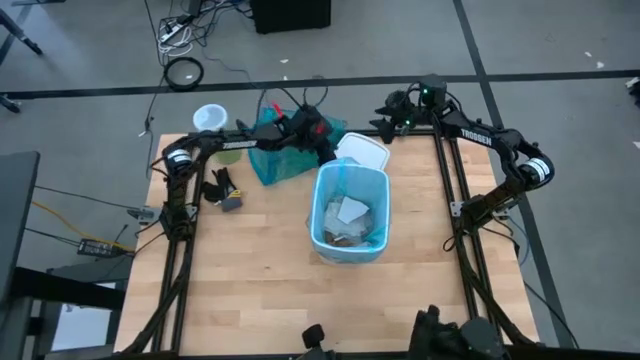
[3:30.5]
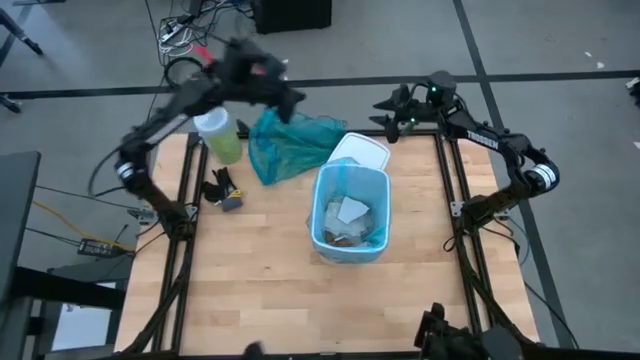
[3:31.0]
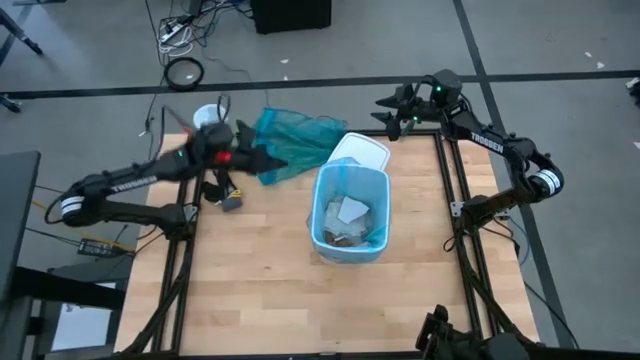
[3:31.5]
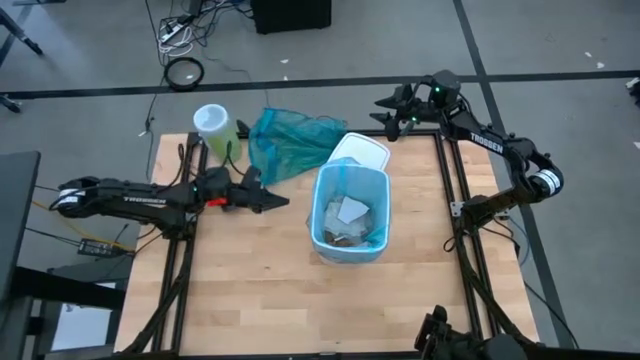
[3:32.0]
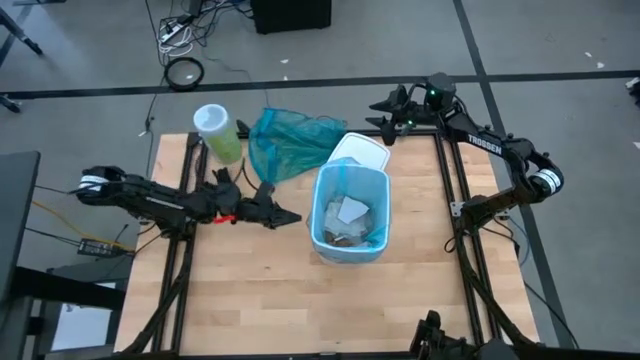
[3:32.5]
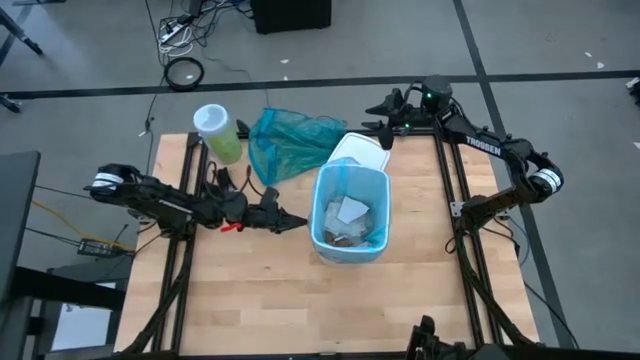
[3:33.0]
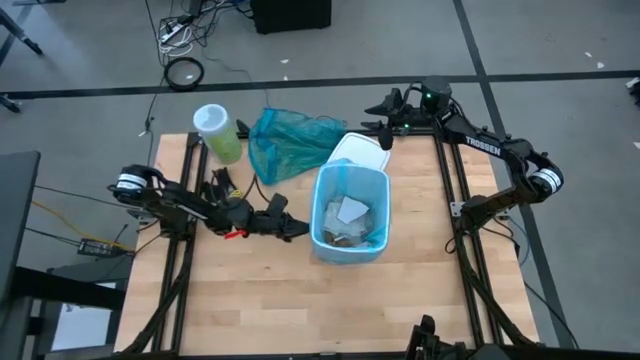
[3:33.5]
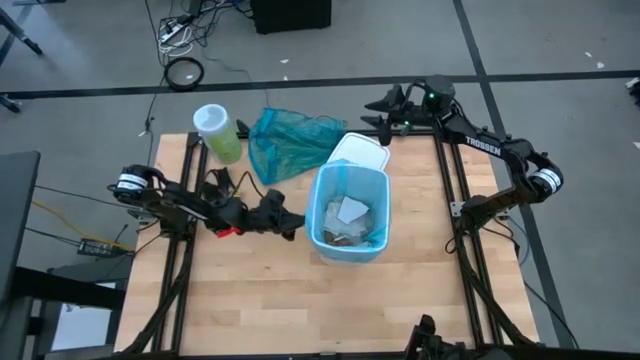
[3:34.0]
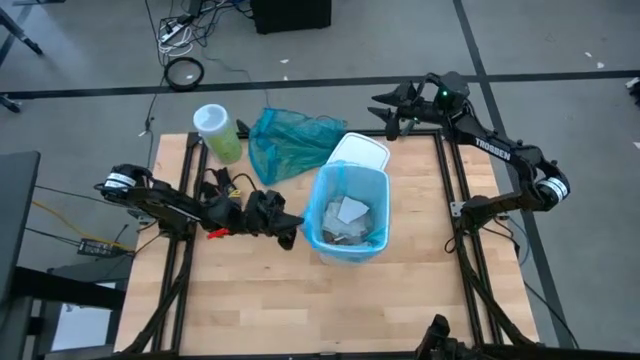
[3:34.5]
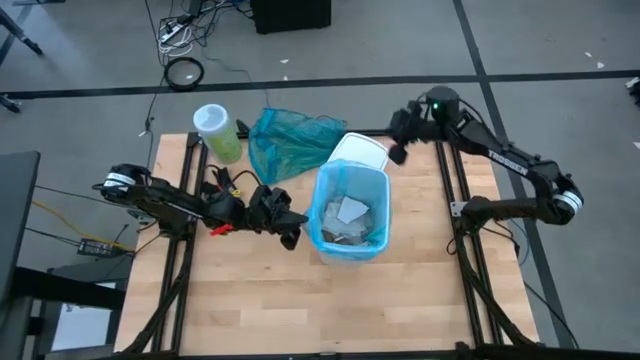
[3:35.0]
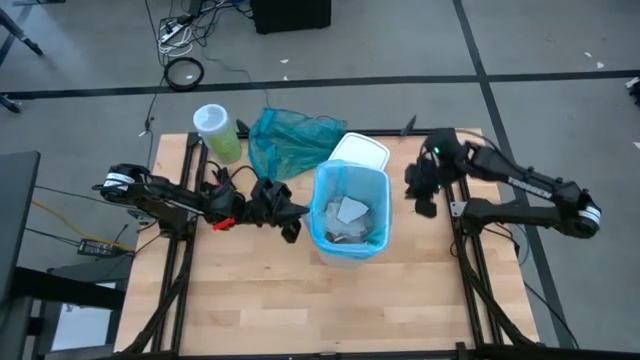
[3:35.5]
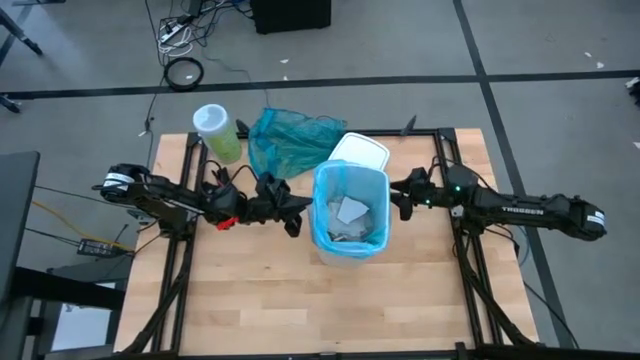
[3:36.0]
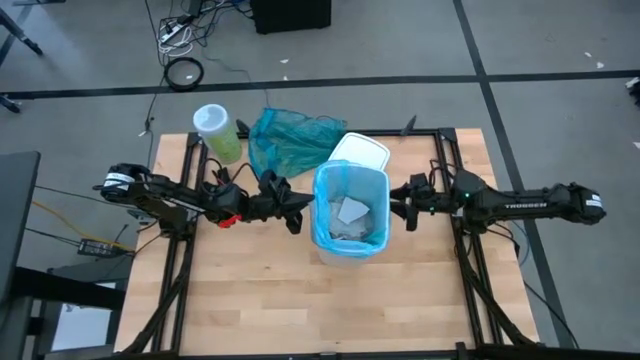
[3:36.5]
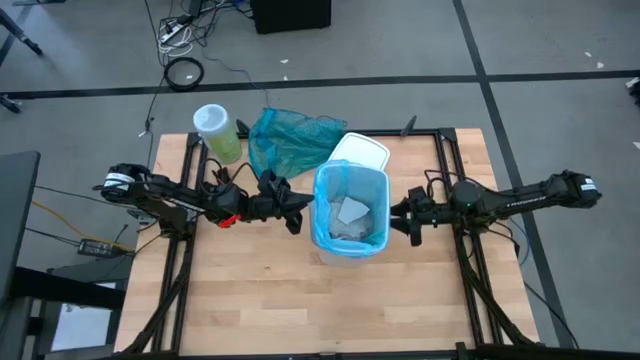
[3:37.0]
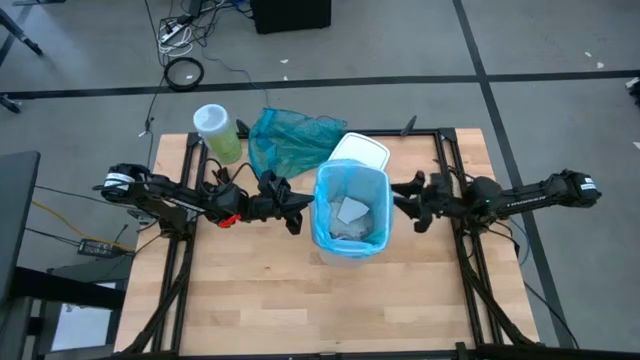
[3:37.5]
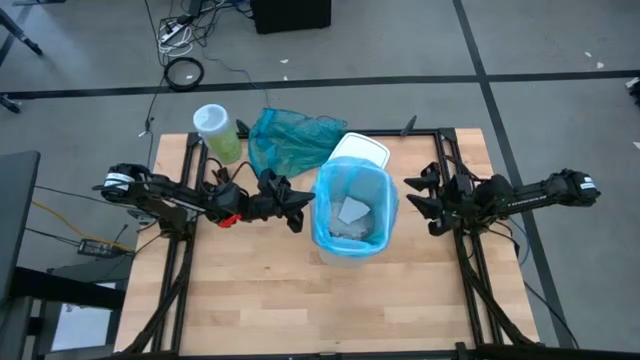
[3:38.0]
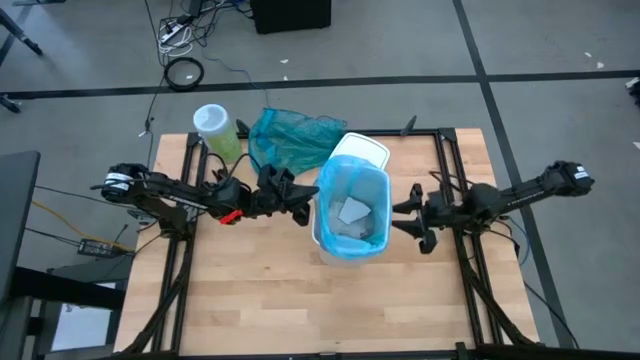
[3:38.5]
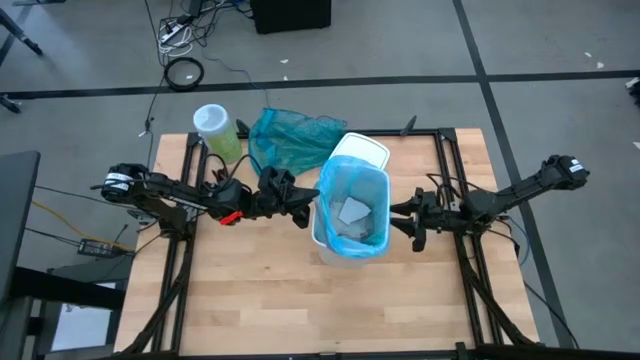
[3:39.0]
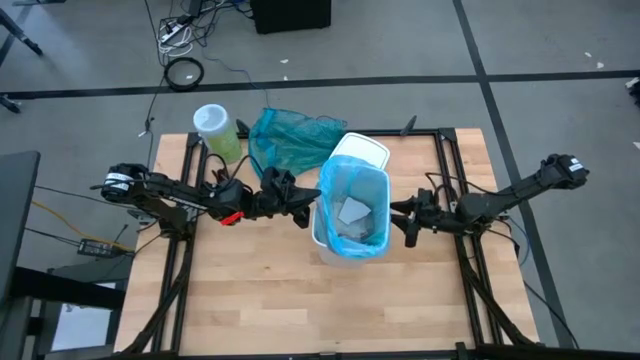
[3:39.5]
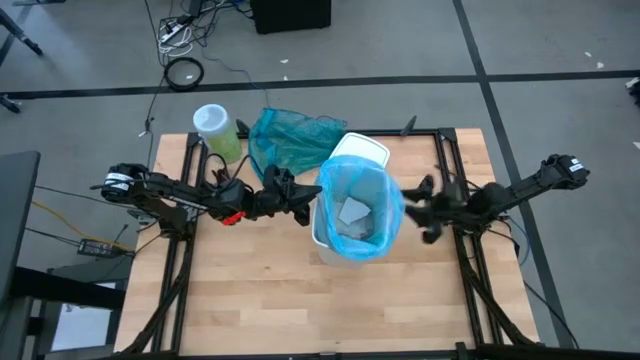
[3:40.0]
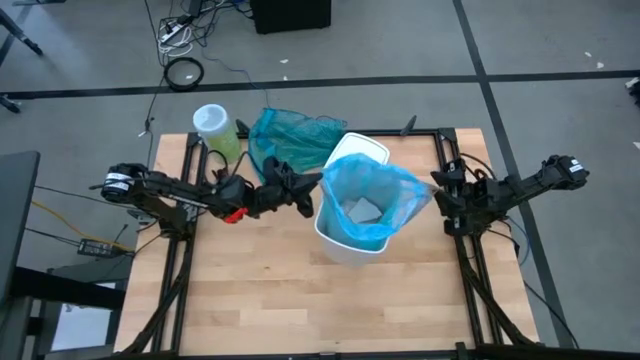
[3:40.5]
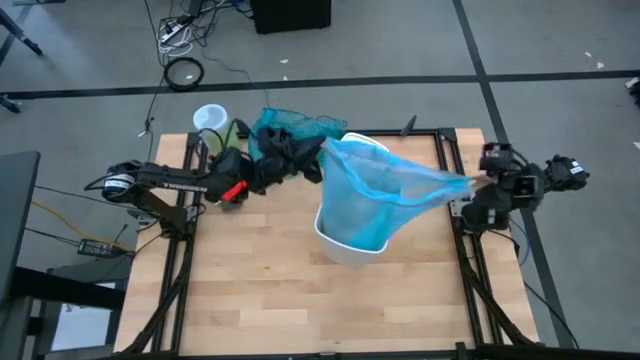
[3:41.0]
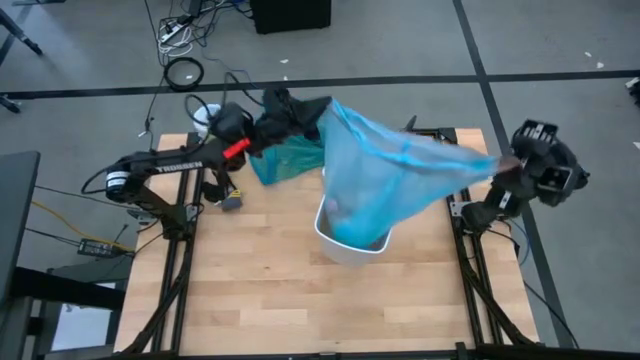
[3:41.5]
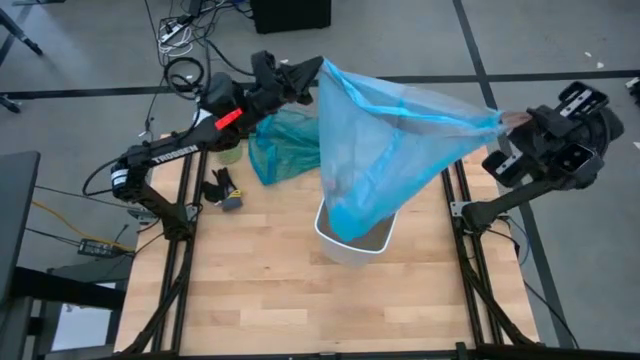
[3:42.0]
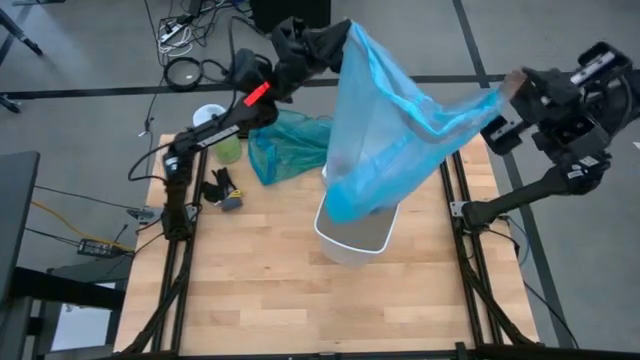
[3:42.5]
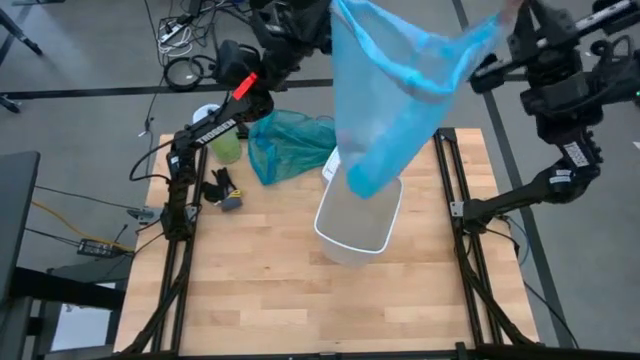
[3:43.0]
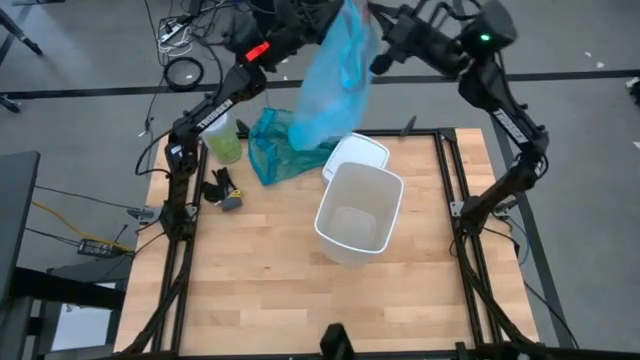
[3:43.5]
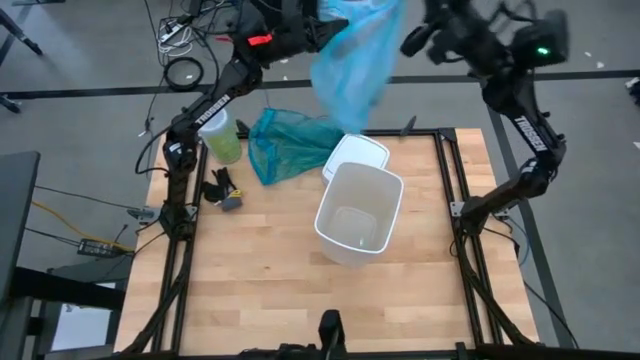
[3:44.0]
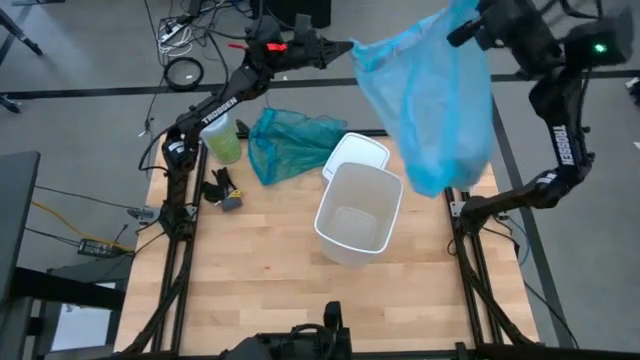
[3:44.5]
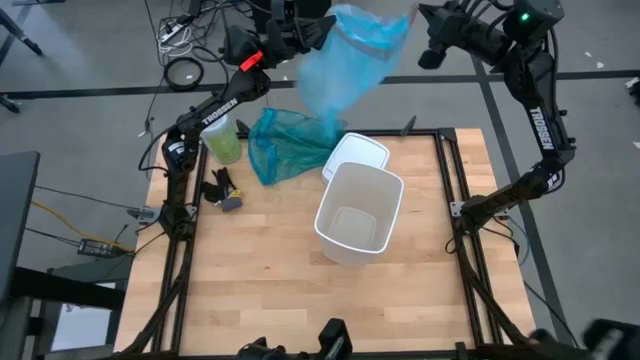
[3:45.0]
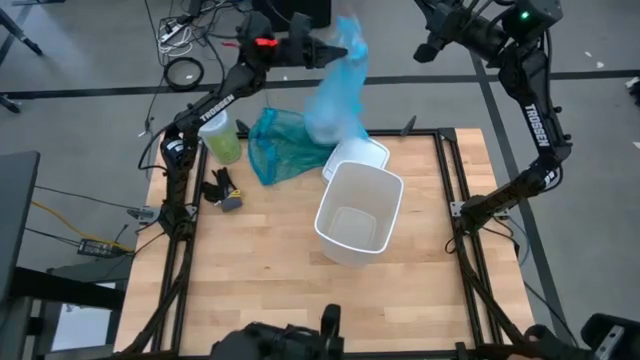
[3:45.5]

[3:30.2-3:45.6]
Task: place trash/remove bag and relplace
Remove the light blue trash bag from the white trash bin

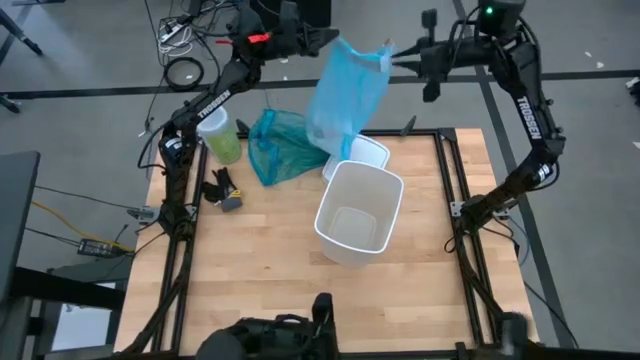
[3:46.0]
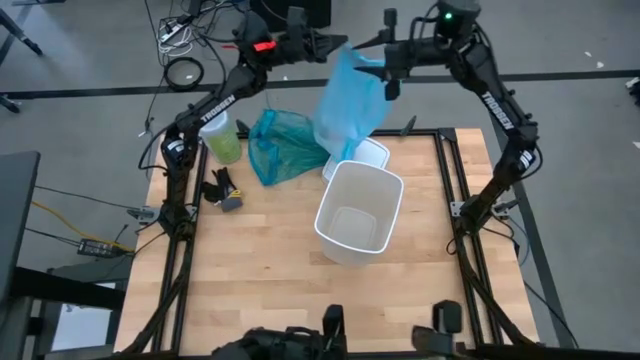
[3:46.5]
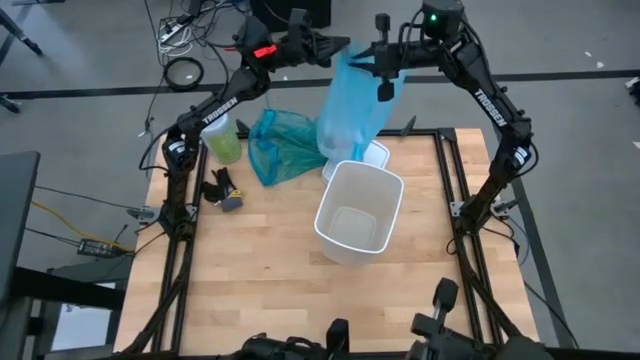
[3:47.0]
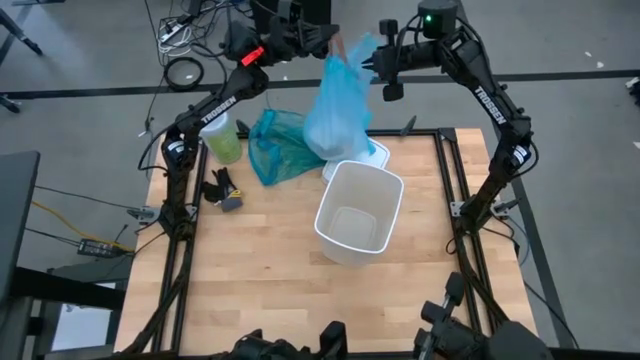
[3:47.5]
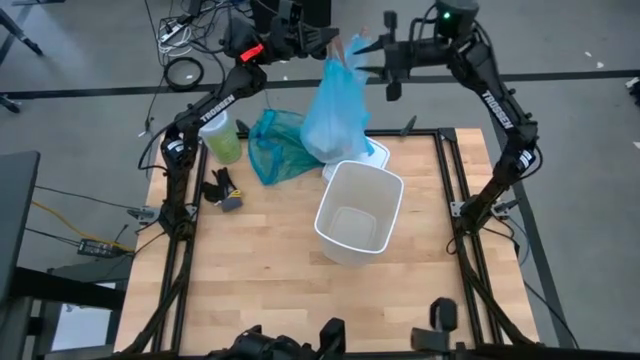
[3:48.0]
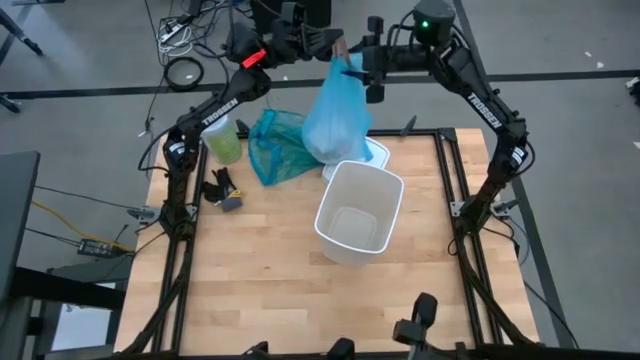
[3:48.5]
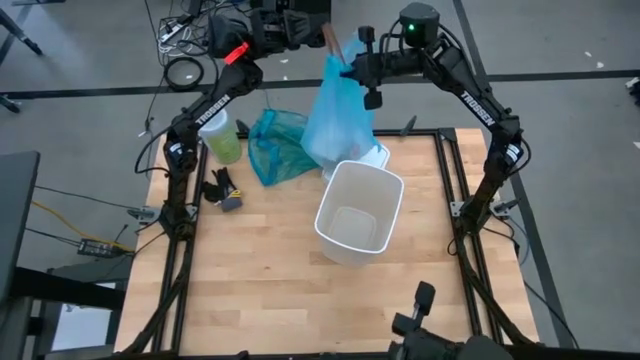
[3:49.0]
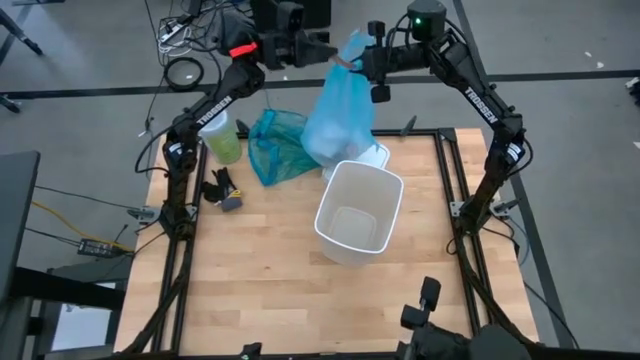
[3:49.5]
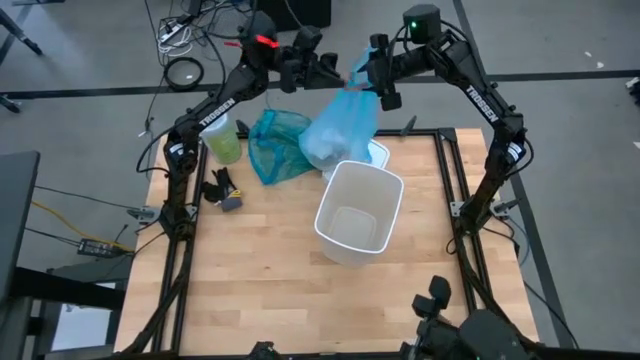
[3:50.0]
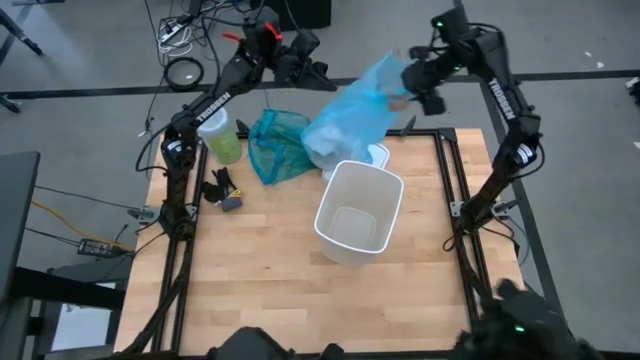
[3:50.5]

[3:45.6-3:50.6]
Close the light blue trash bag

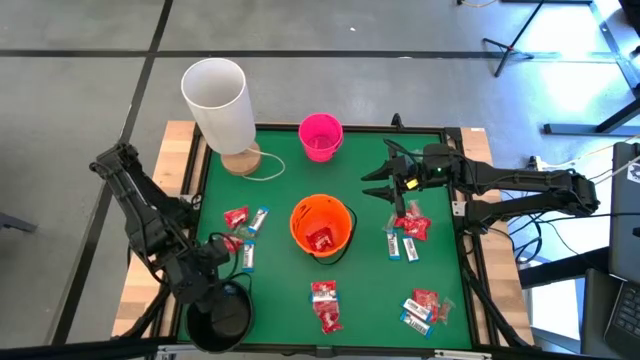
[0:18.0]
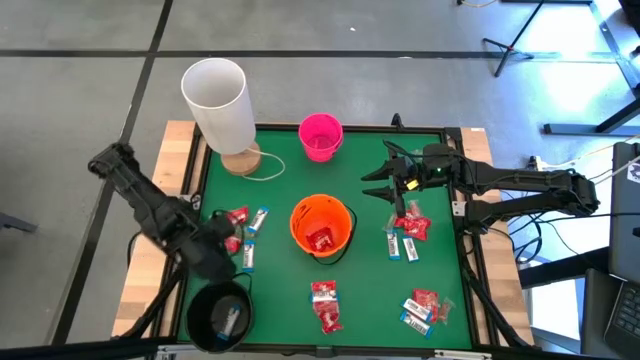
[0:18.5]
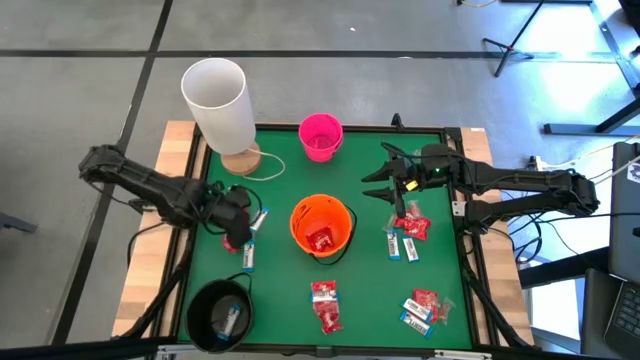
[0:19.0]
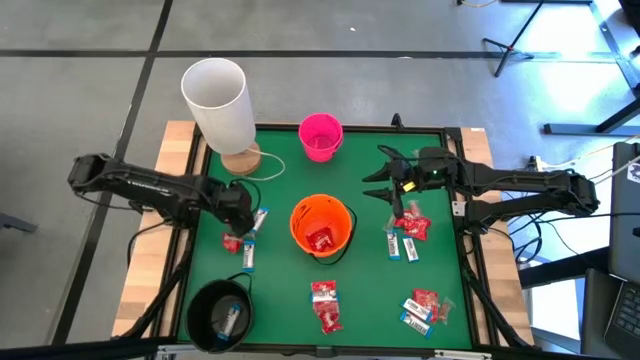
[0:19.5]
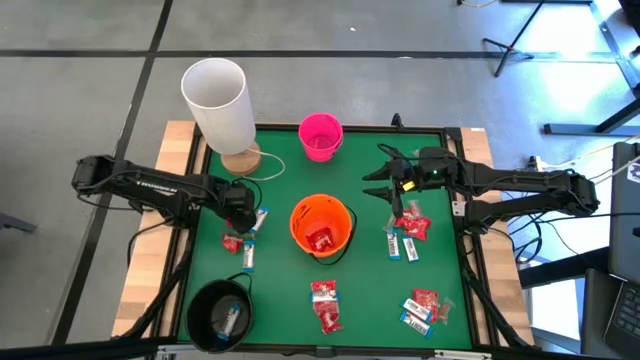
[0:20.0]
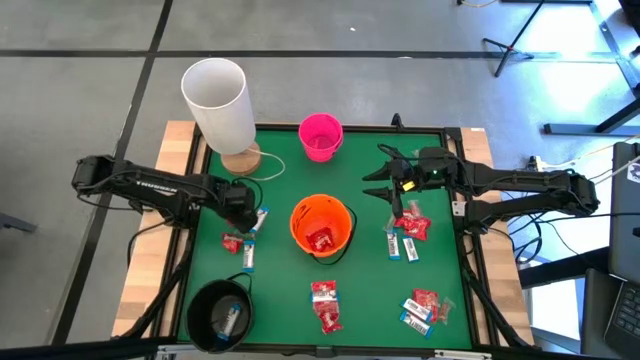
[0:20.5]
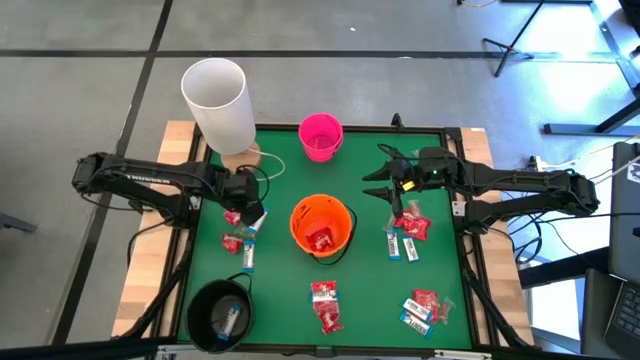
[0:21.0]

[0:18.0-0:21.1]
Task: Sort candy
Put the red candy into the orange bucket
